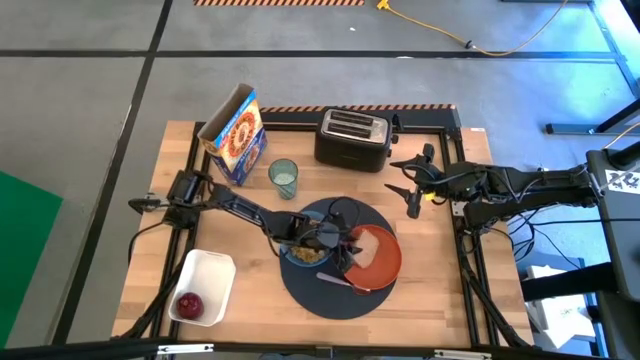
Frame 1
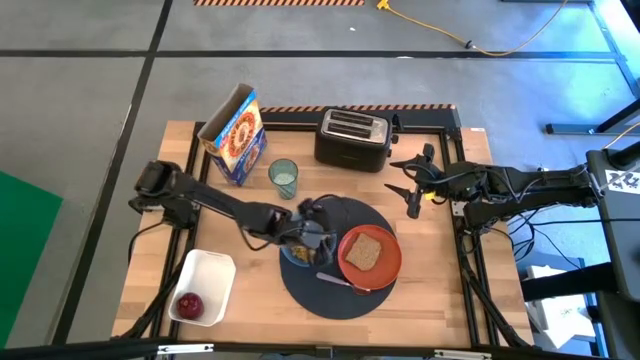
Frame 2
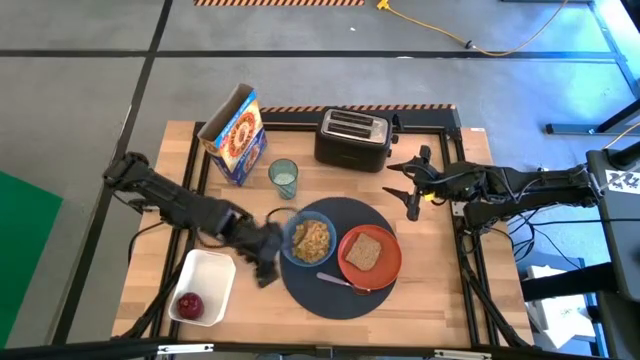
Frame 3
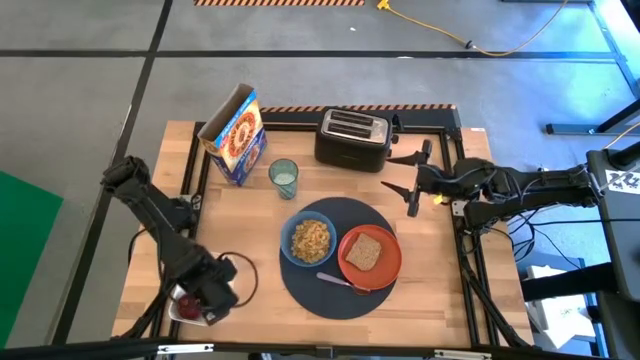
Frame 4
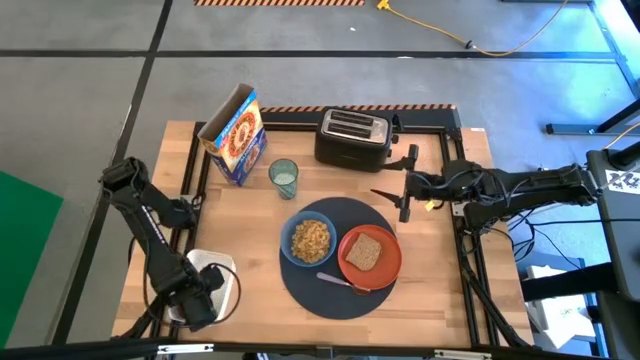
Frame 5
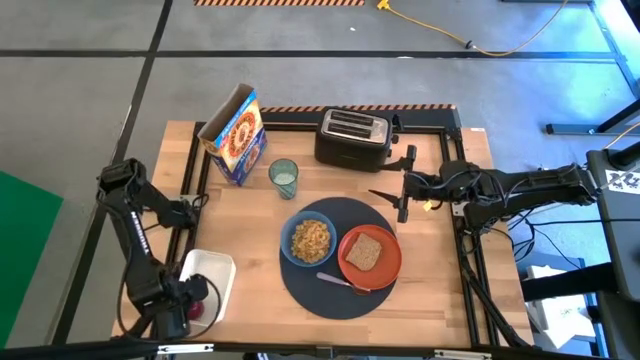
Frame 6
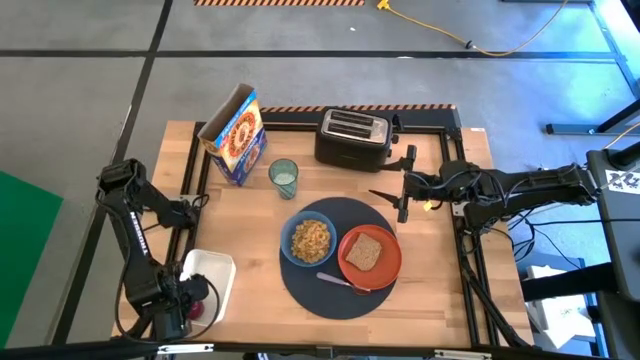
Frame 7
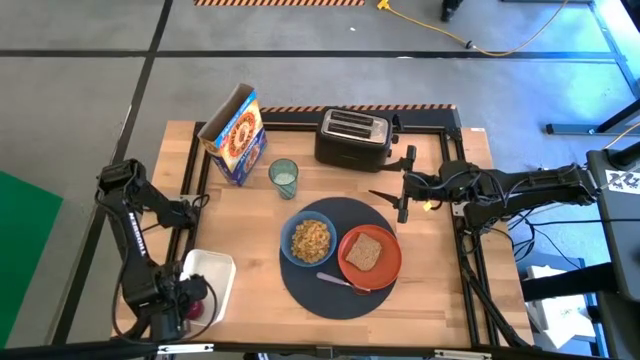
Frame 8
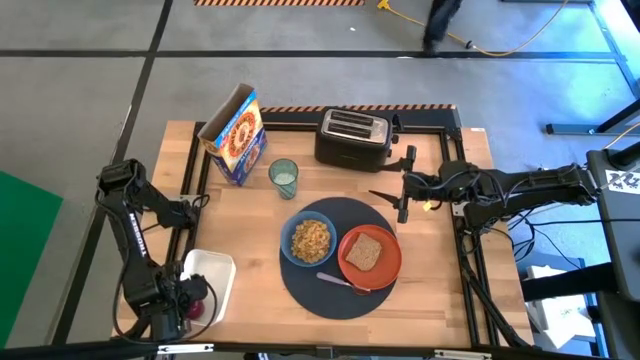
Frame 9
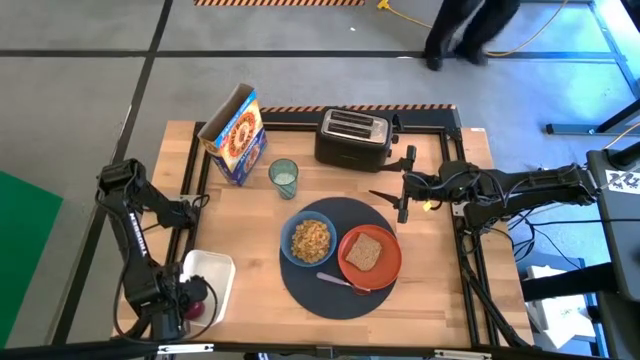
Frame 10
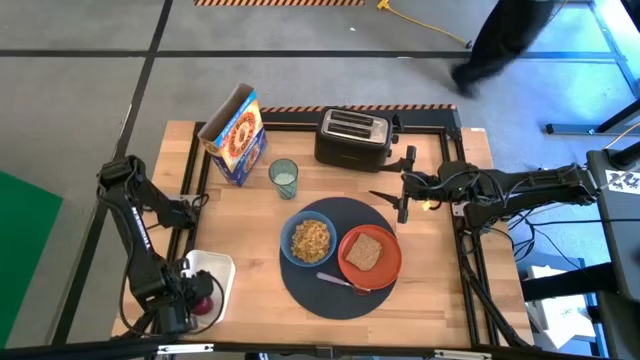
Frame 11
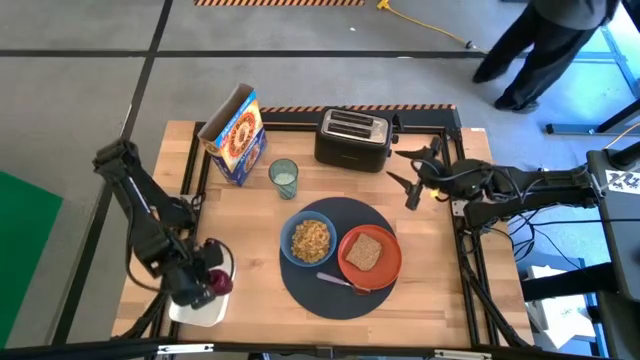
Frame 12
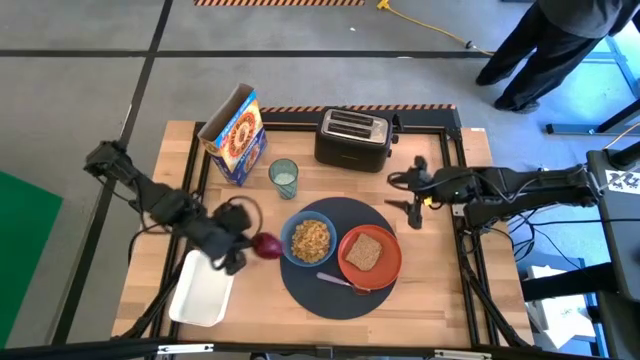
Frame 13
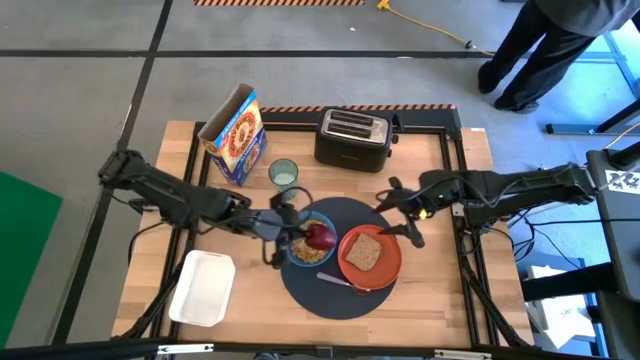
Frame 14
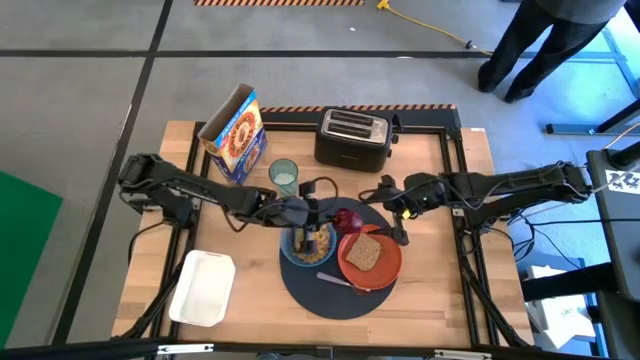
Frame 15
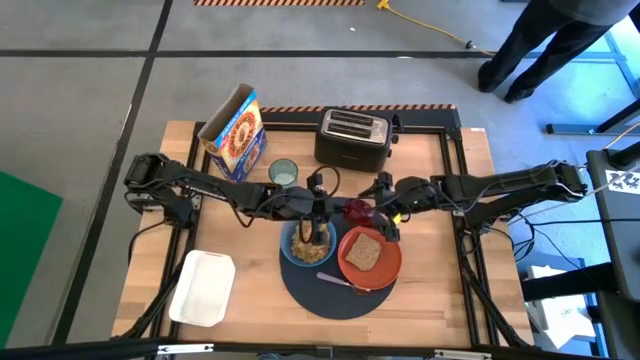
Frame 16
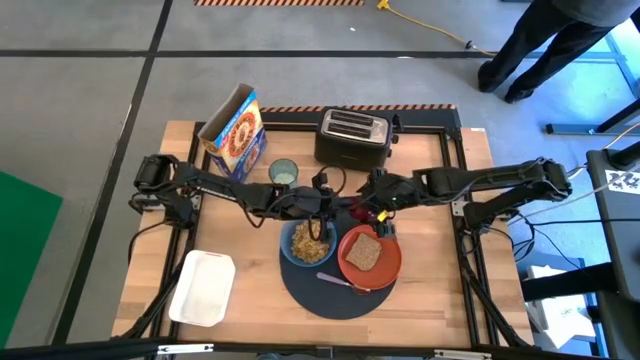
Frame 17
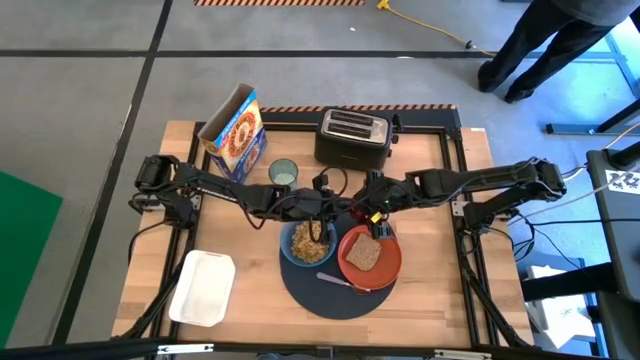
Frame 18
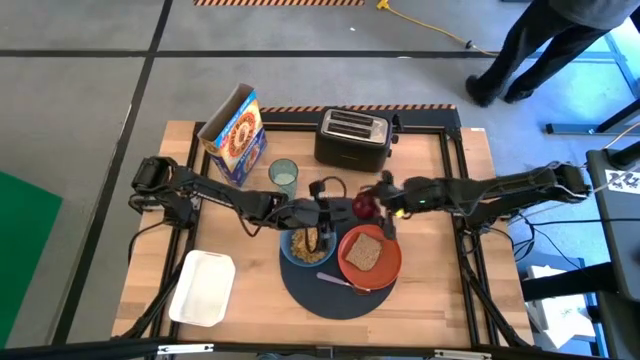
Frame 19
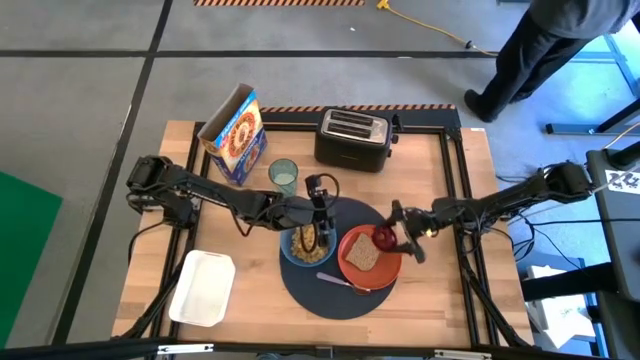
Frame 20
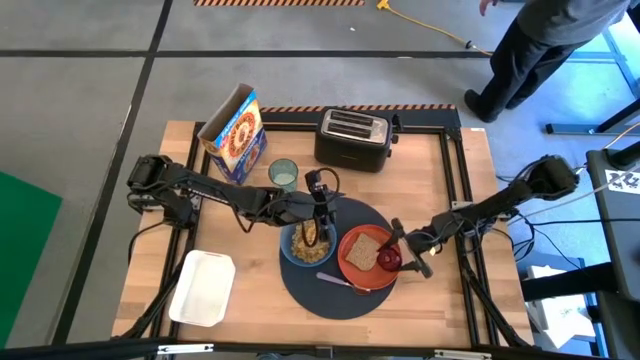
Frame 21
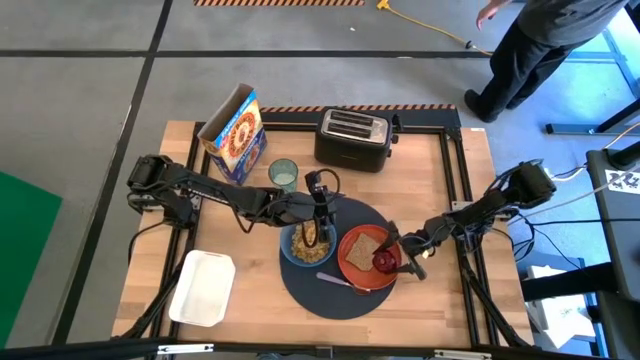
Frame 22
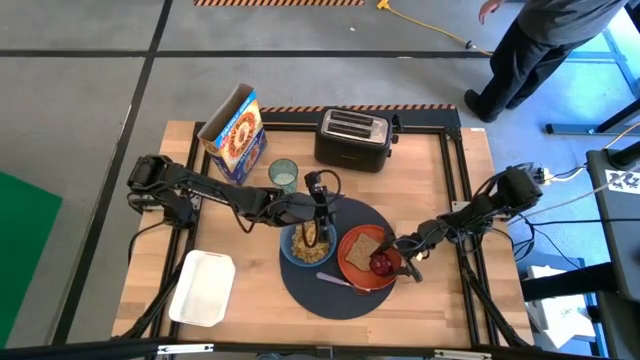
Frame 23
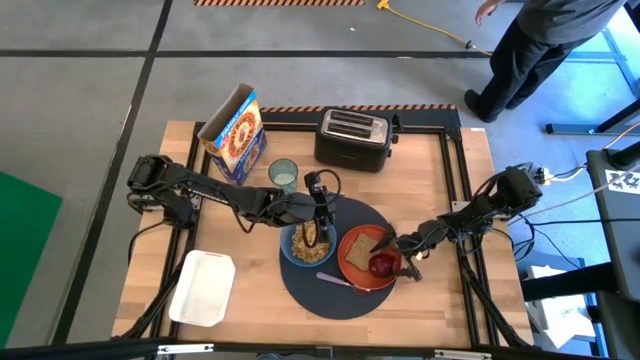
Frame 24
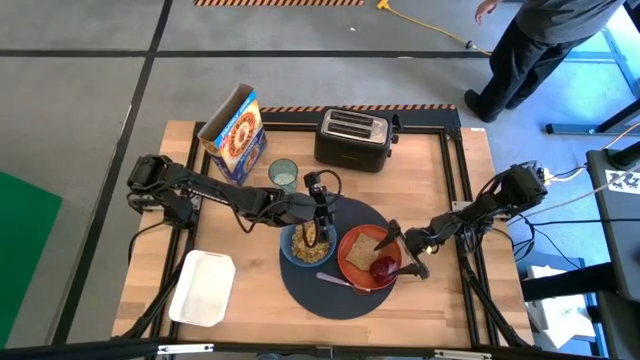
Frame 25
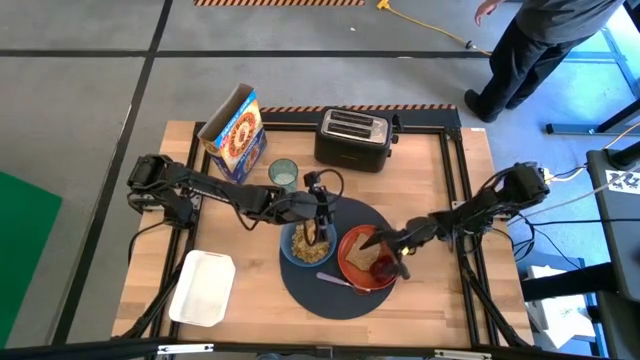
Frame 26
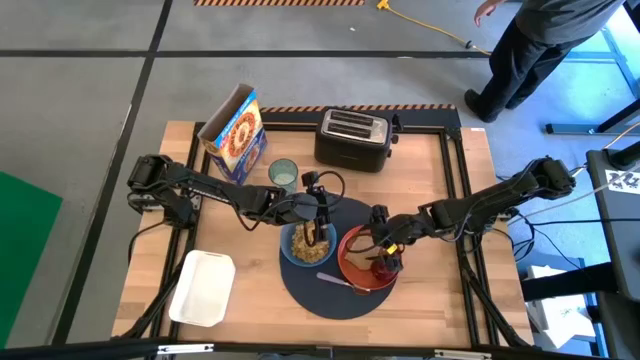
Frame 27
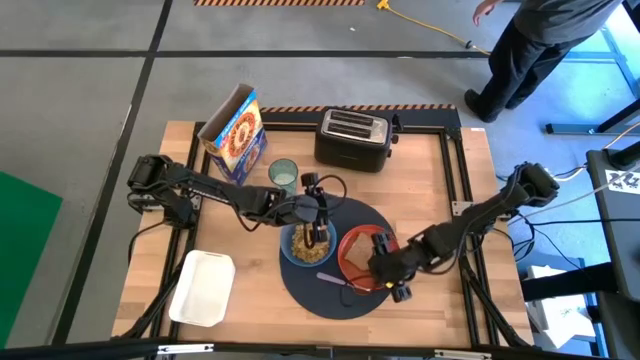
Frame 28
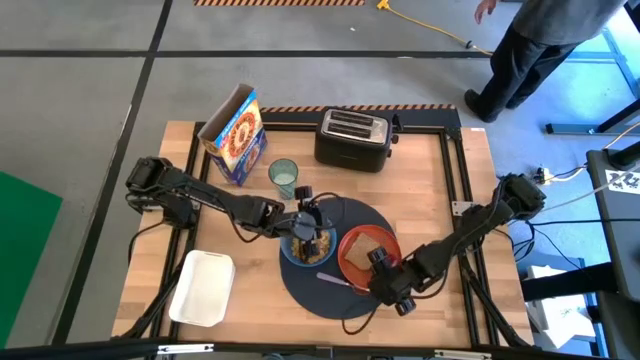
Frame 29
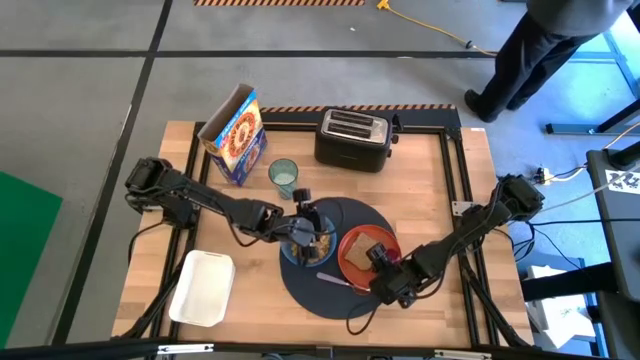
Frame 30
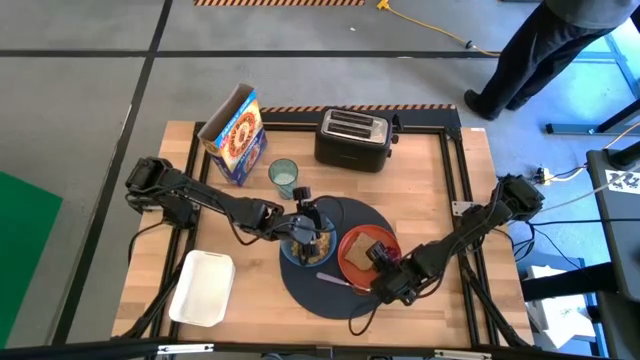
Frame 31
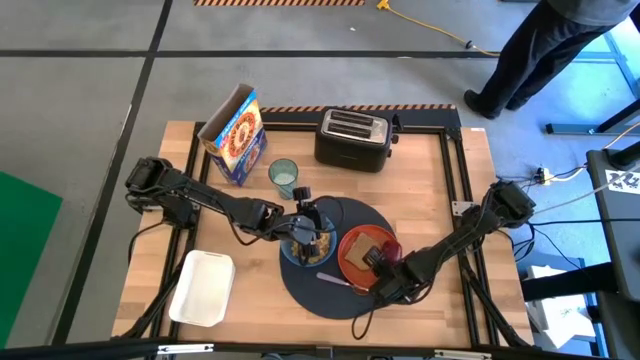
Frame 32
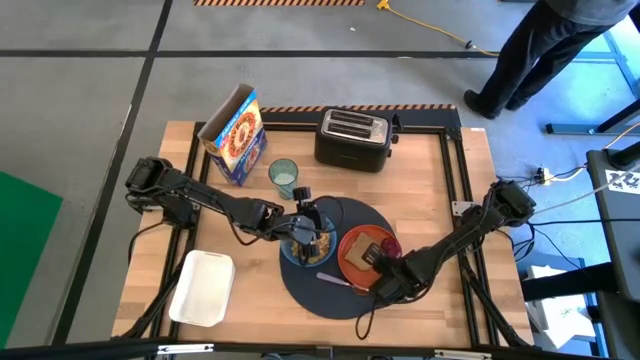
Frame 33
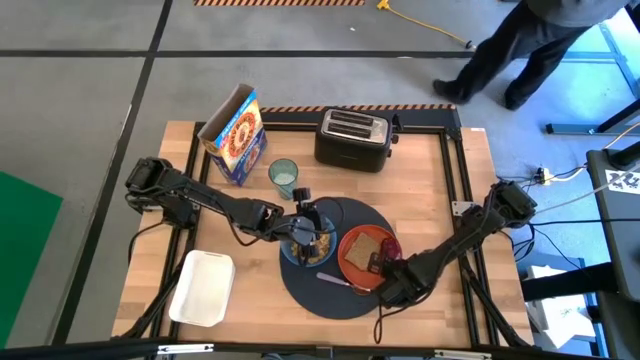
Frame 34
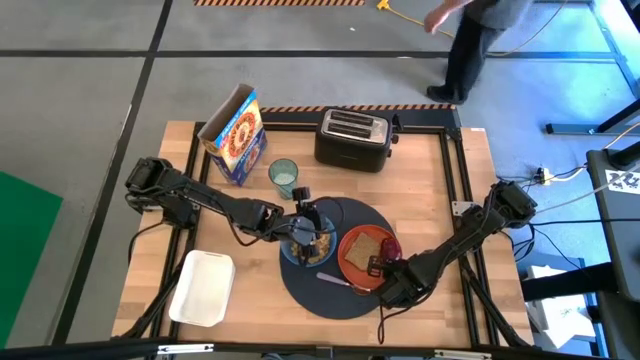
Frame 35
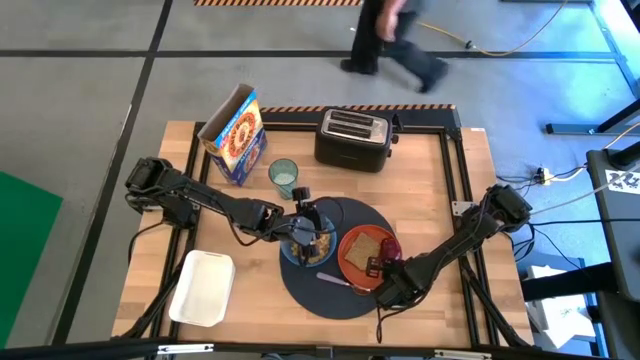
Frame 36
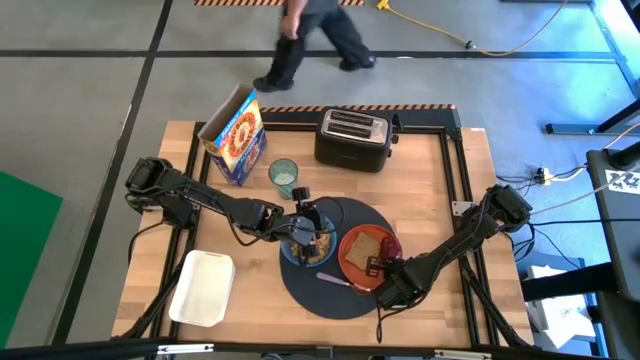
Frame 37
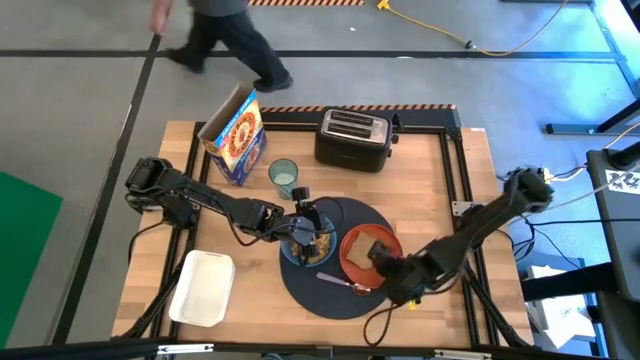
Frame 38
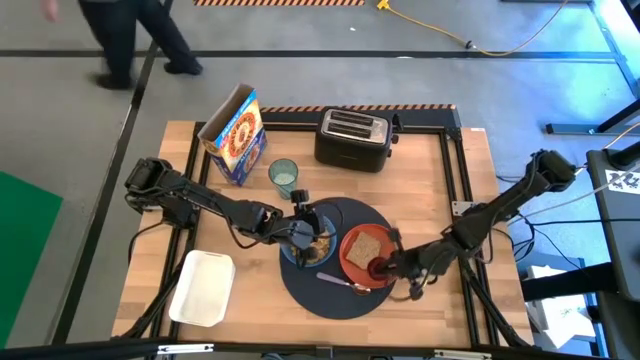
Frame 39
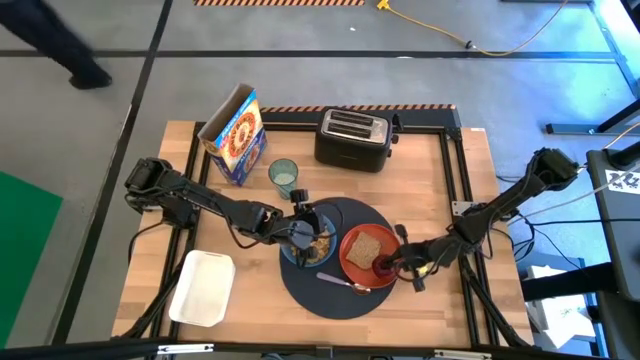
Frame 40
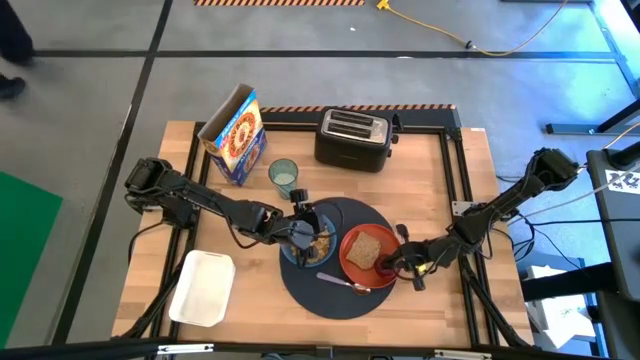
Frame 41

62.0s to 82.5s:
Task: Arrange a breakfast setting
Put the red apple on the orange plate

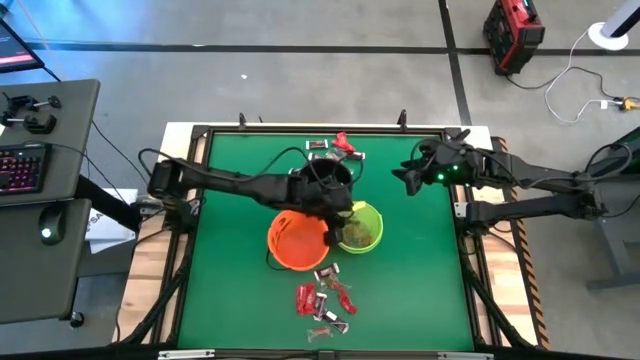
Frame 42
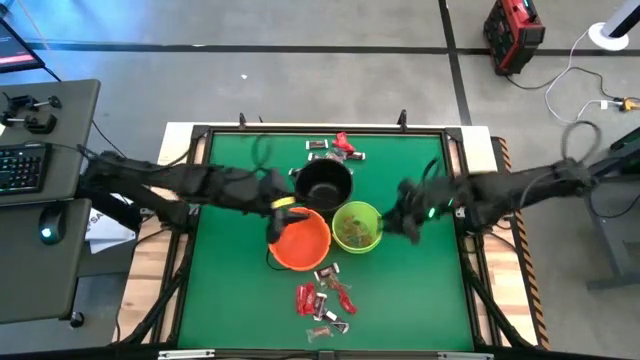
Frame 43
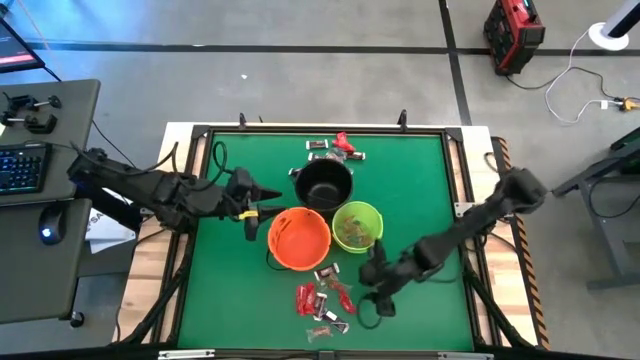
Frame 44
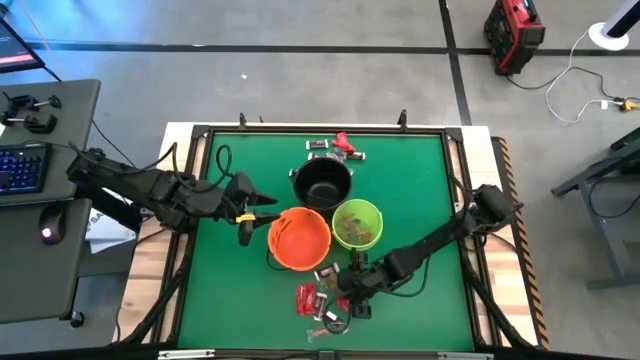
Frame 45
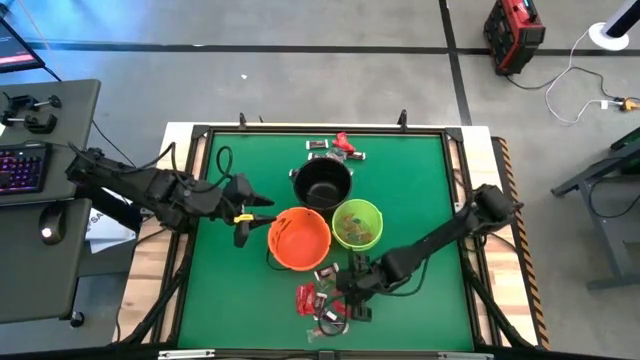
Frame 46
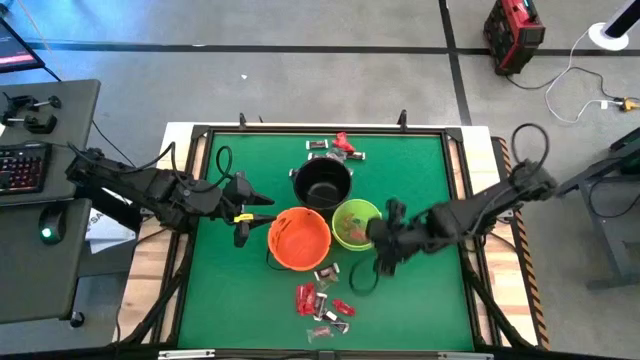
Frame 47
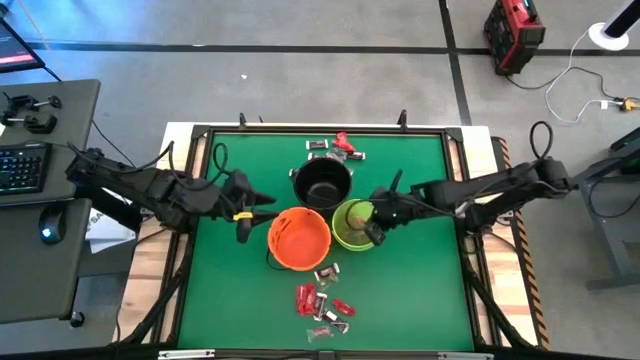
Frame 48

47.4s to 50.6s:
Task: Sort candy by brand, put in halloween buckets
Put the red gummy into the green bucket
